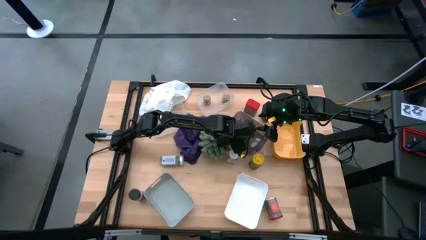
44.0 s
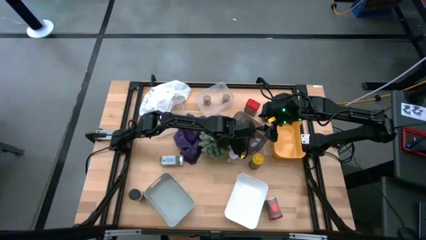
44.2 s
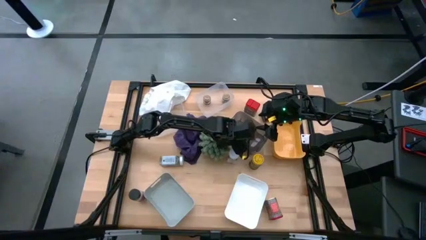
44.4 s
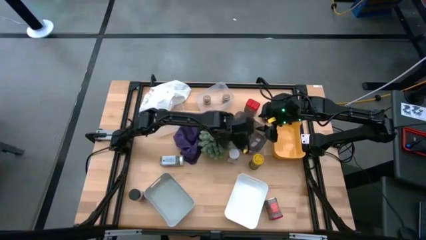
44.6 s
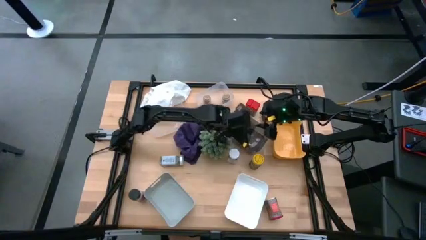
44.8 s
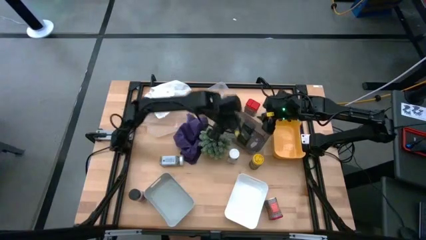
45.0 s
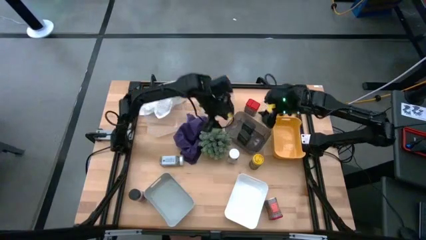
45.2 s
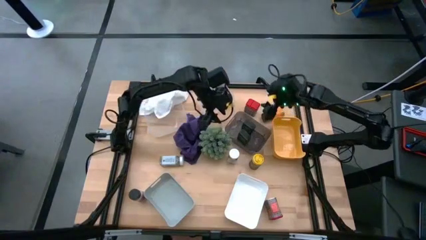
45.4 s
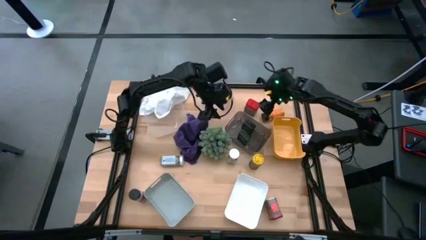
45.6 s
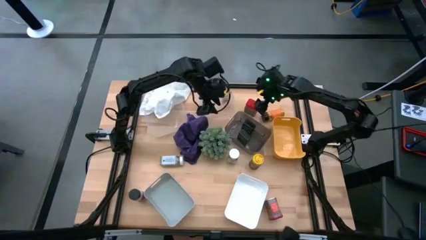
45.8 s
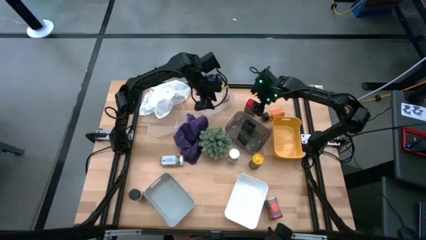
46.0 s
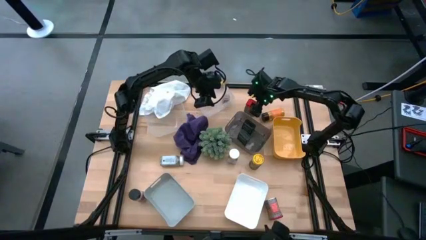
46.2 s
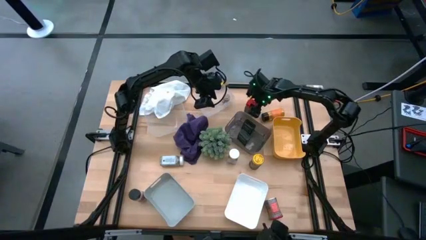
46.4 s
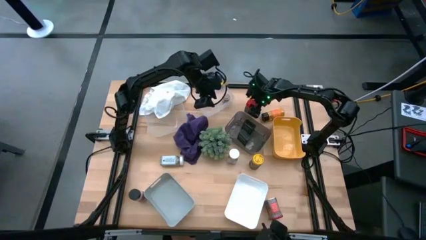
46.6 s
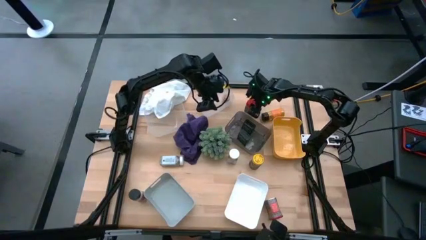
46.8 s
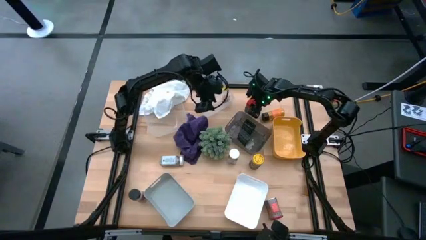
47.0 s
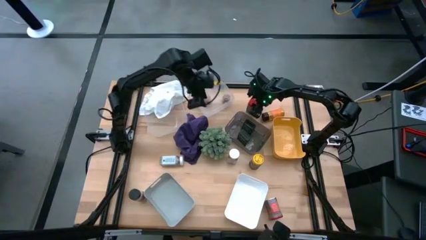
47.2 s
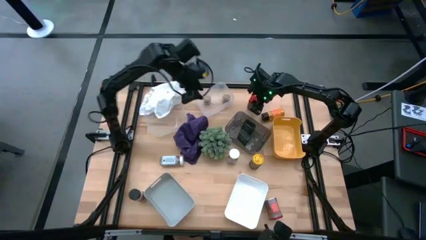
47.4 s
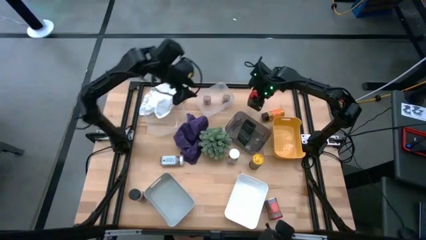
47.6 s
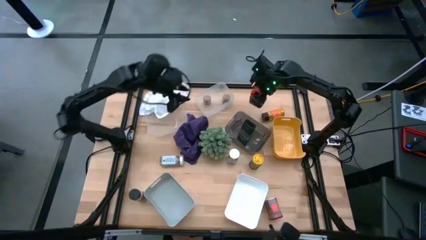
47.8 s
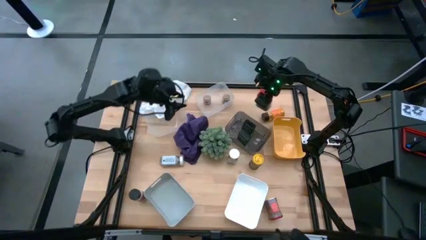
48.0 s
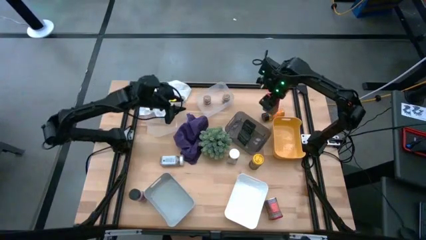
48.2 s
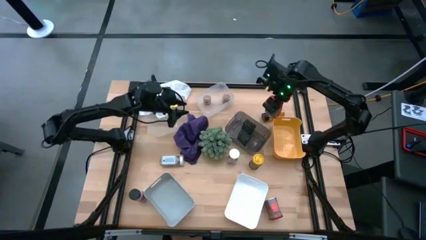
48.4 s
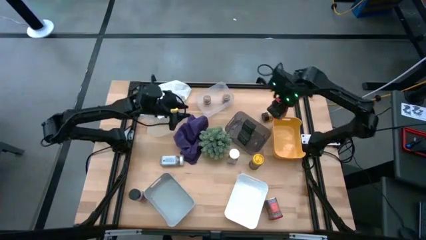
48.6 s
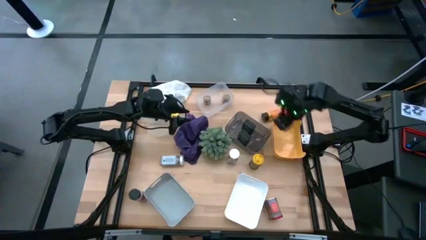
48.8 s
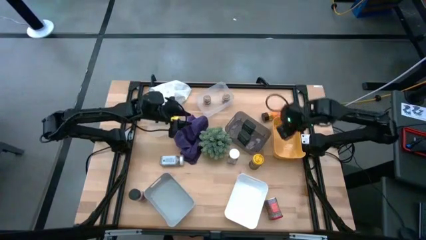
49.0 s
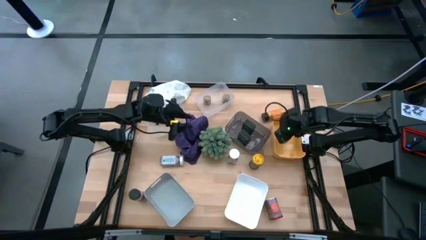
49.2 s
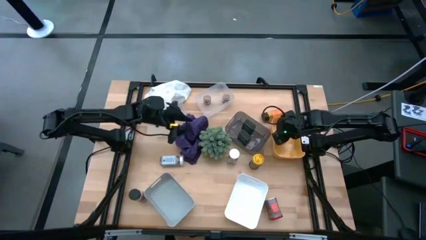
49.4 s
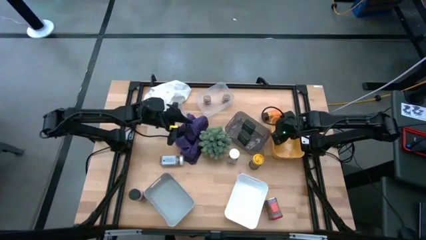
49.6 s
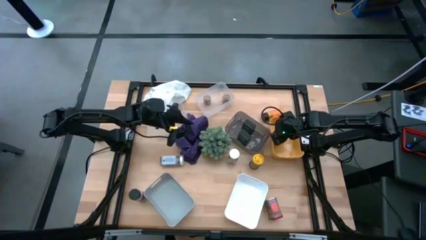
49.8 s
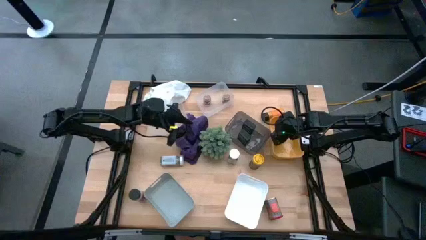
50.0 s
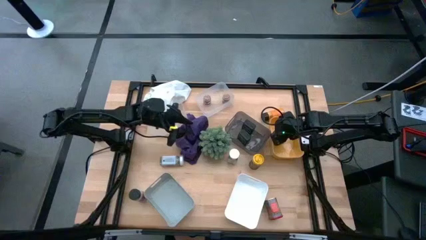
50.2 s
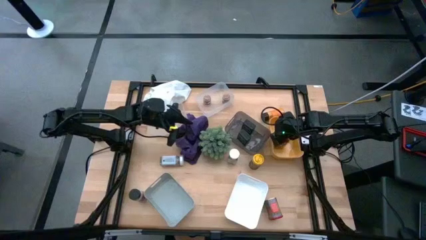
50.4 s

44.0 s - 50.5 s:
Task: Sort spices by type
Put the top red seasoning can into the orange bin

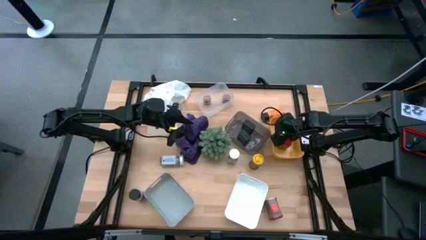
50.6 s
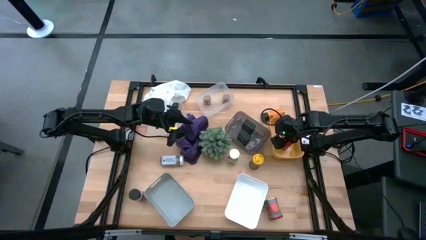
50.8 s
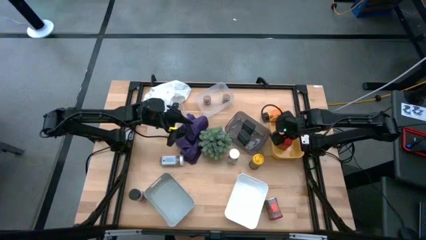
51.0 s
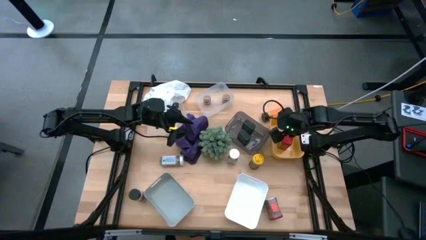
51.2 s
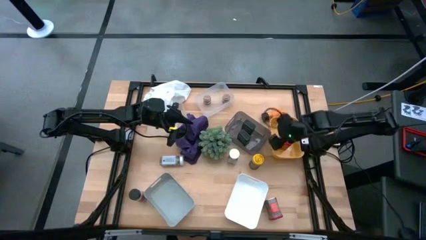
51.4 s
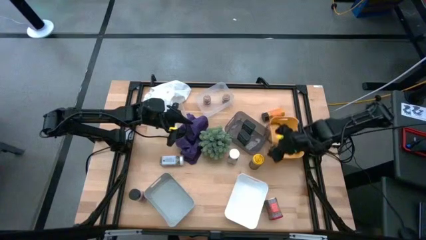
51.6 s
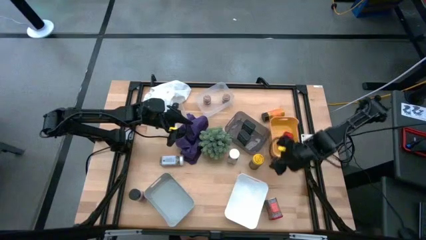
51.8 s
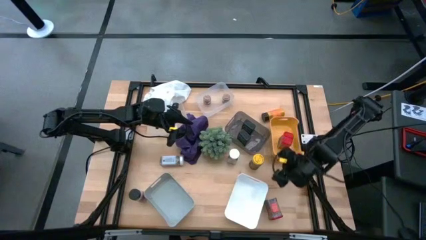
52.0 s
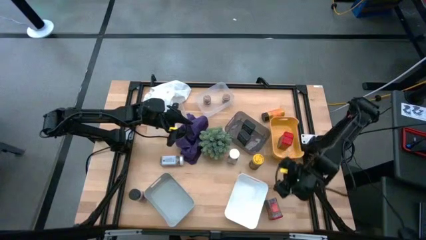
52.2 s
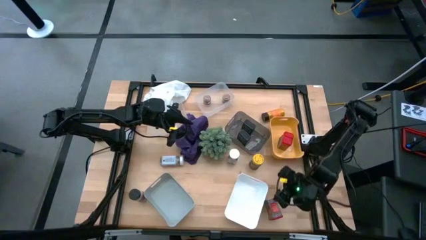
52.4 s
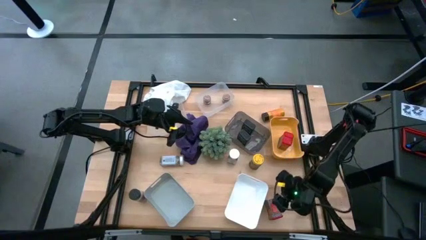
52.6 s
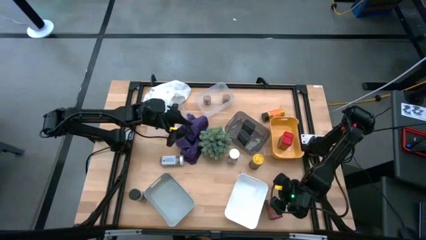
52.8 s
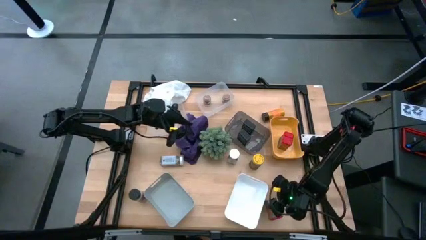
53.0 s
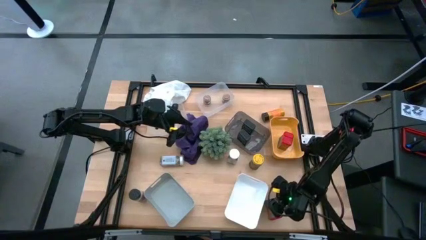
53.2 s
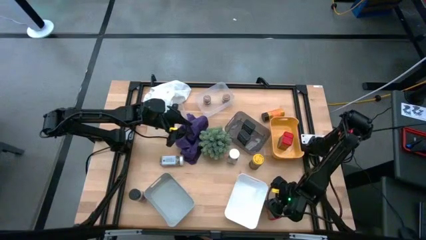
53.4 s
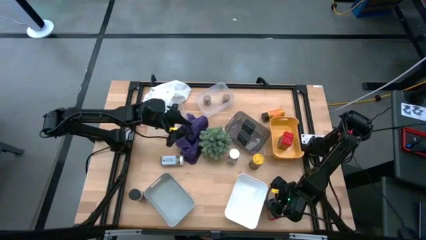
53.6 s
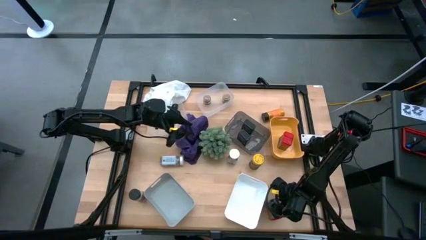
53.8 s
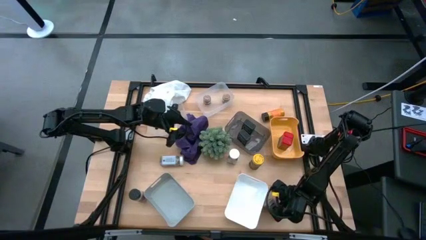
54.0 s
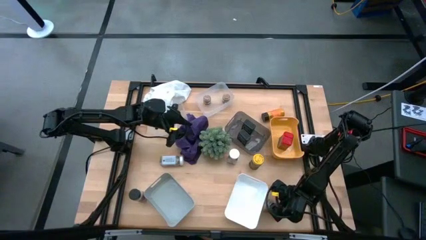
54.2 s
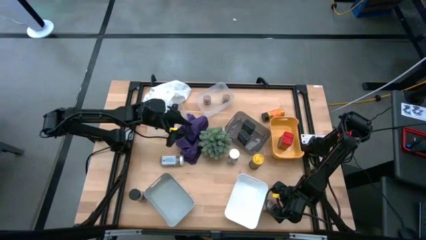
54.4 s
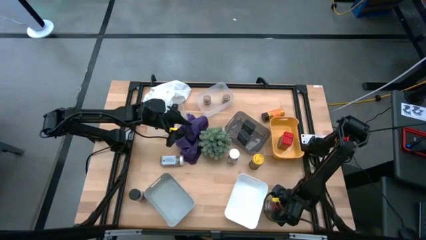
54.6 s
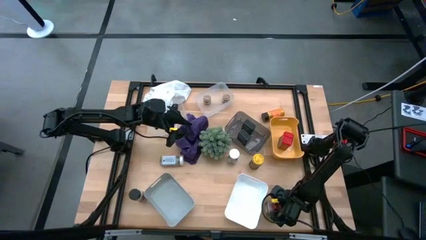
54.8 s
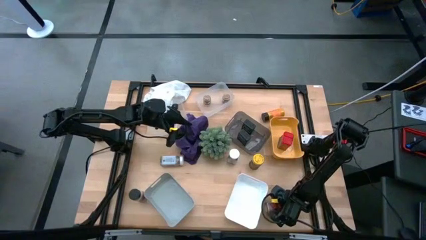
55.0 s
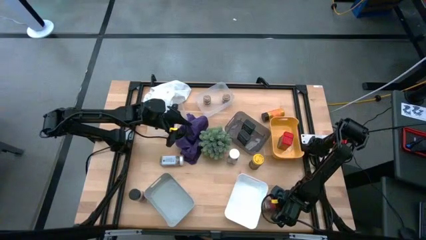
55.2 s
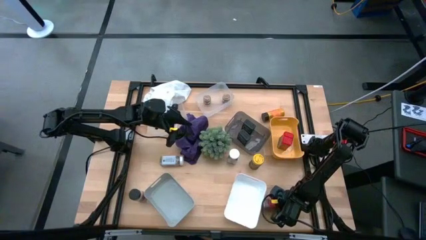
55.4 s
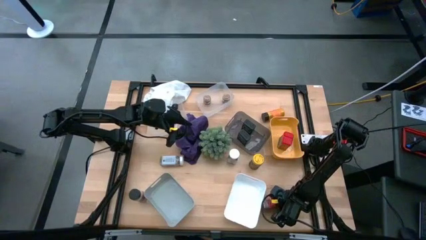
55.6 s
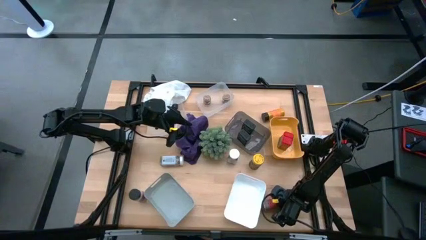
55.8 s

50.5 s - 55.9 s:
Put the red seasoning can into the orange bin
